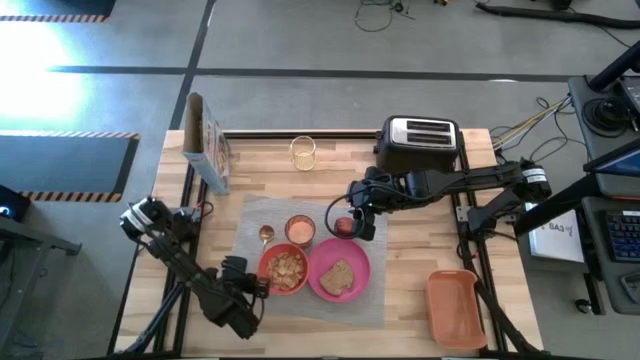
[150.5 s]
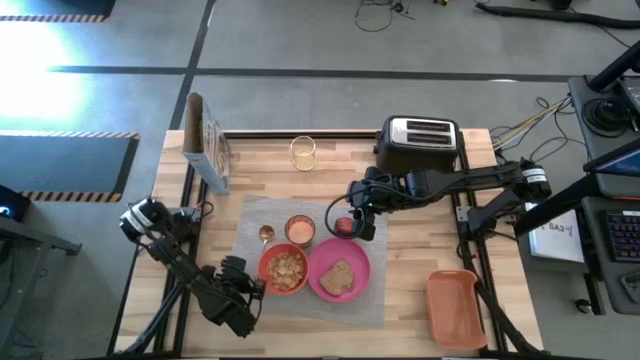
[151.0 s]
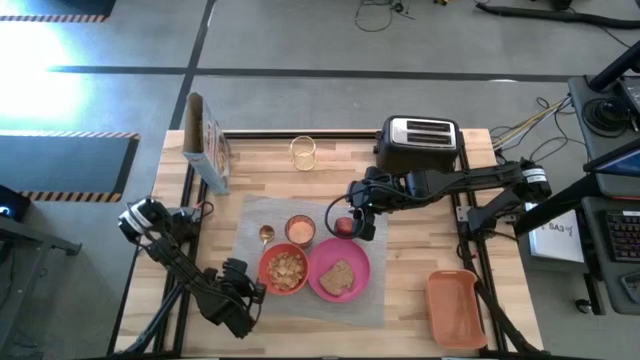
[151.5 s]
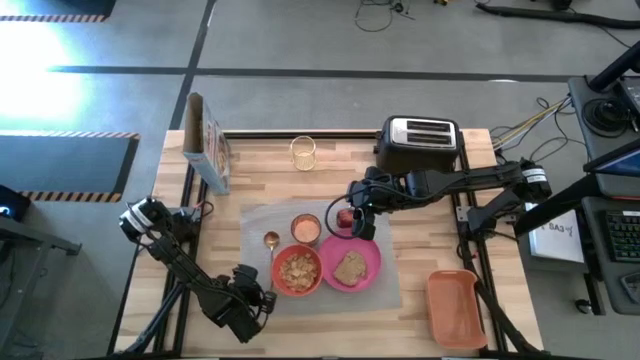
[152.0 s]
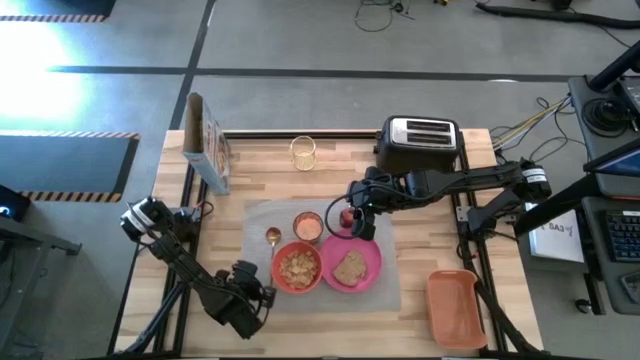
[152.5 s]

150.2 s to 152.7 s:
Task: Arrange a breakfast setting
Adjust the gray mat

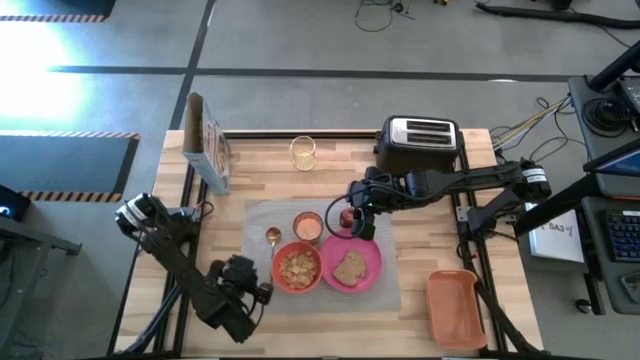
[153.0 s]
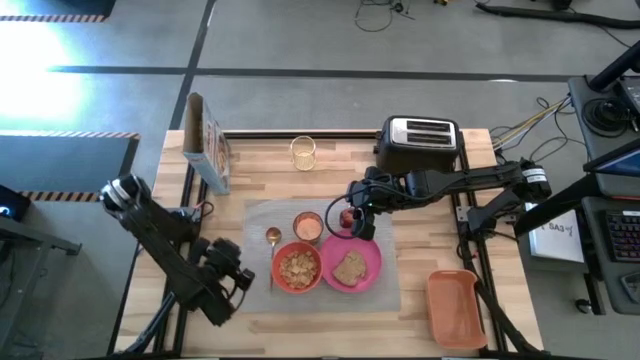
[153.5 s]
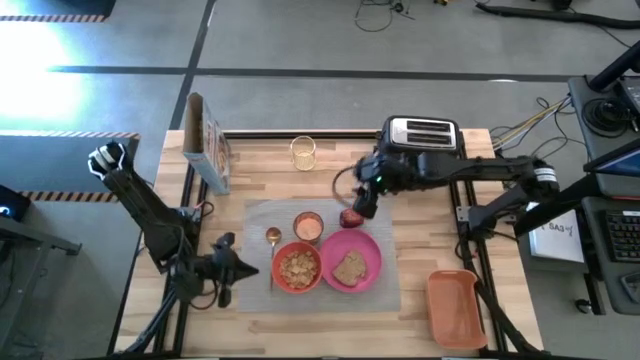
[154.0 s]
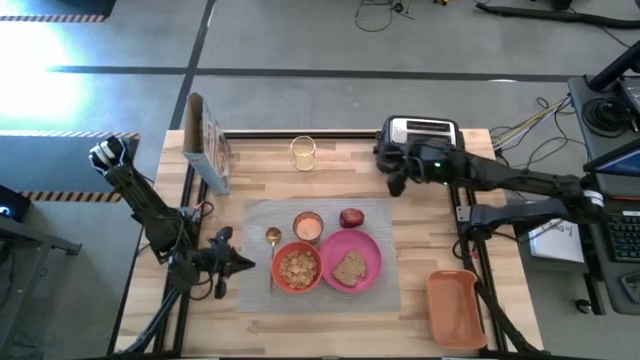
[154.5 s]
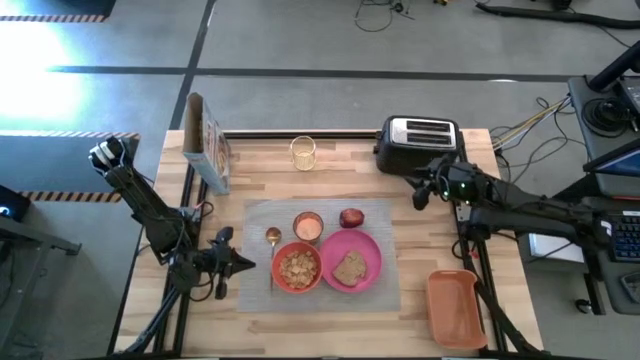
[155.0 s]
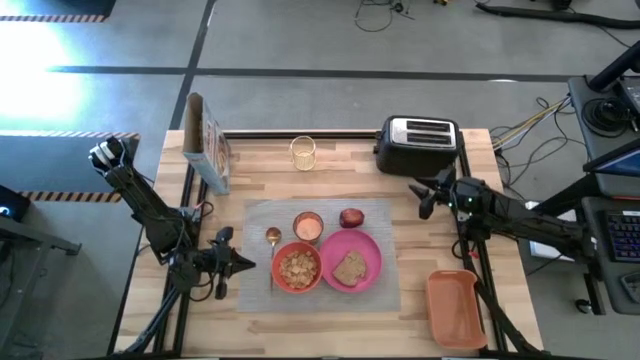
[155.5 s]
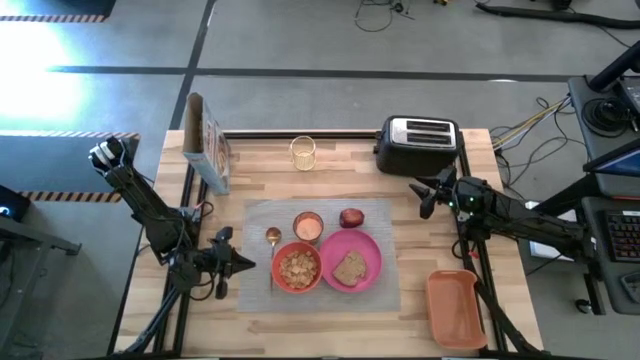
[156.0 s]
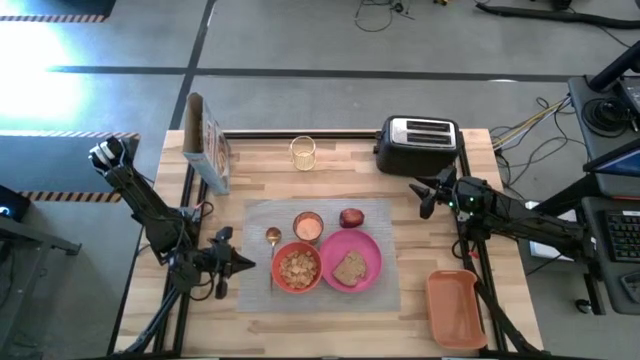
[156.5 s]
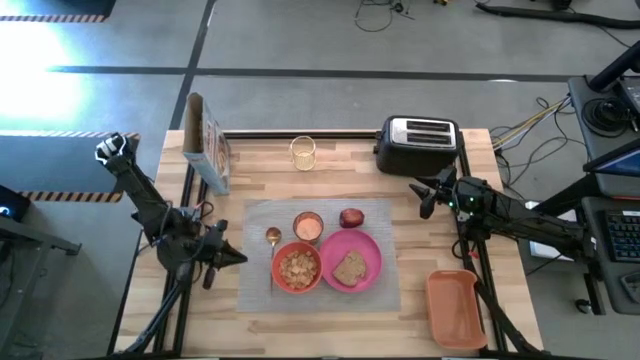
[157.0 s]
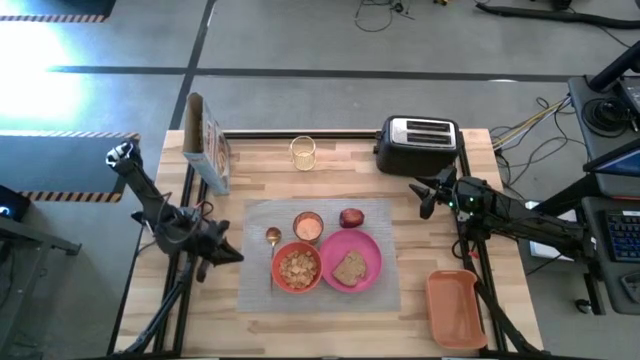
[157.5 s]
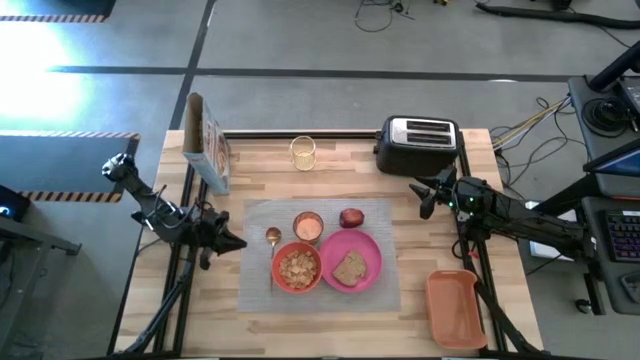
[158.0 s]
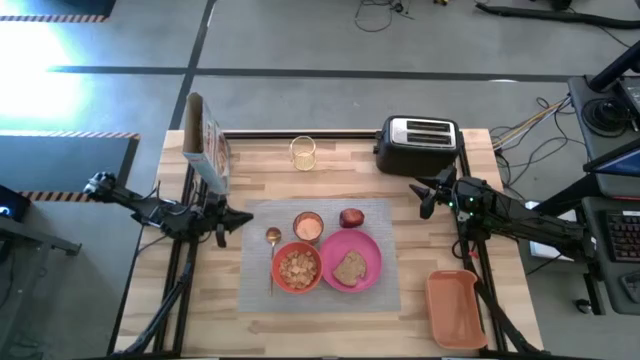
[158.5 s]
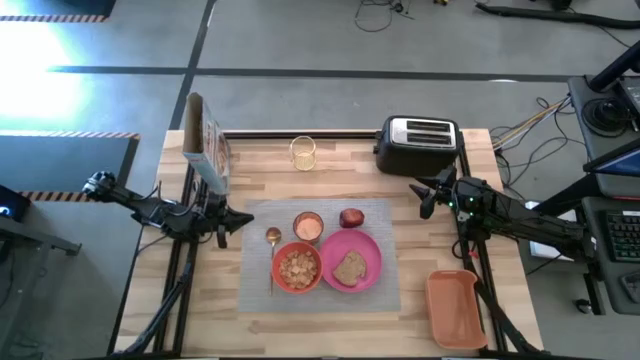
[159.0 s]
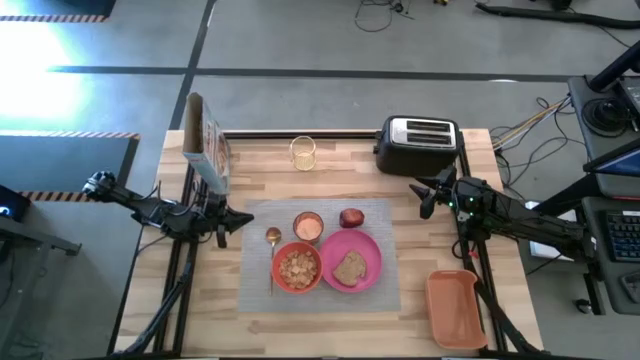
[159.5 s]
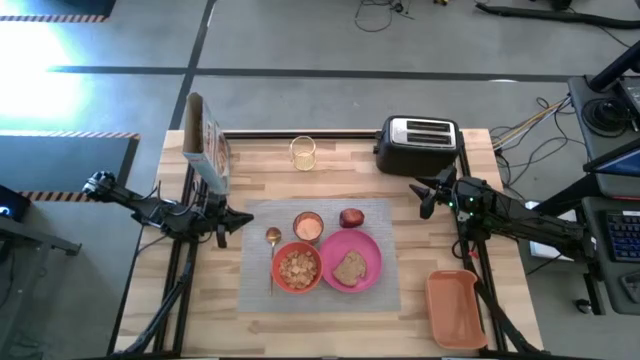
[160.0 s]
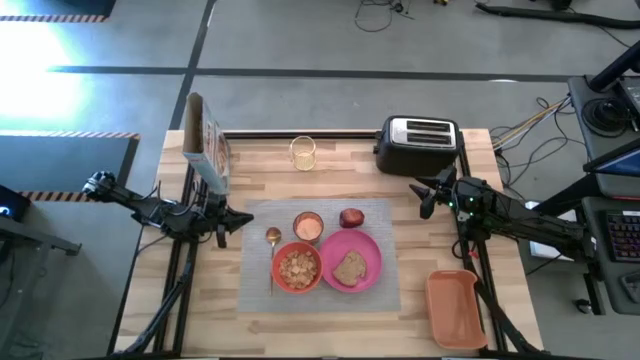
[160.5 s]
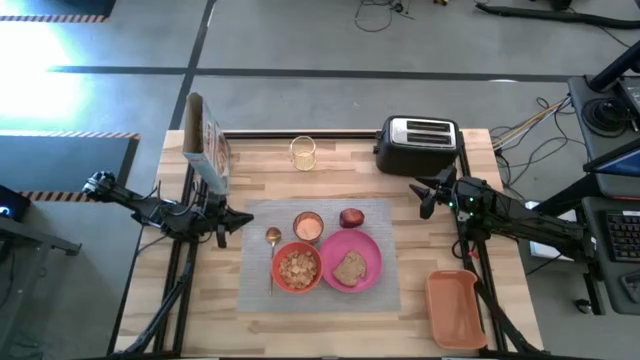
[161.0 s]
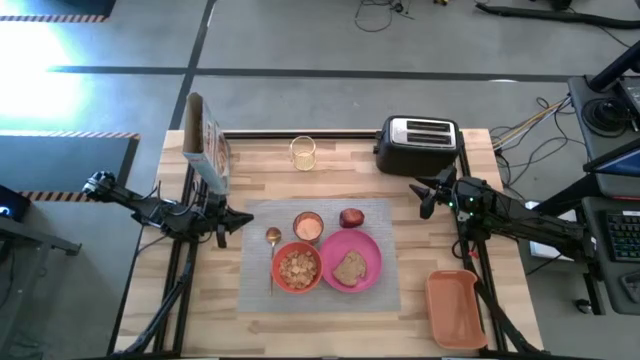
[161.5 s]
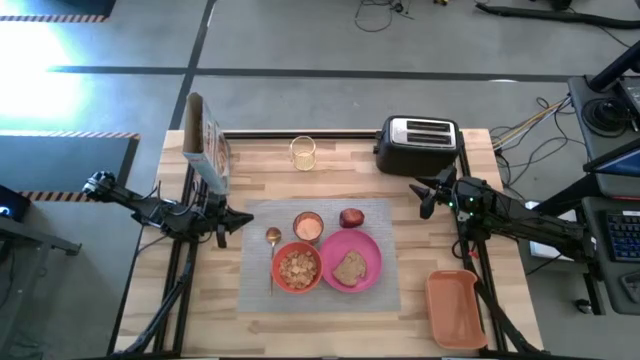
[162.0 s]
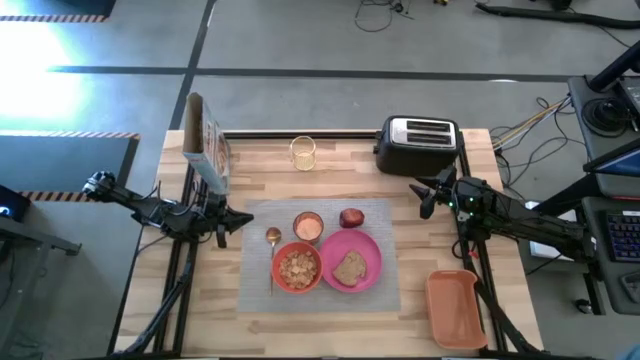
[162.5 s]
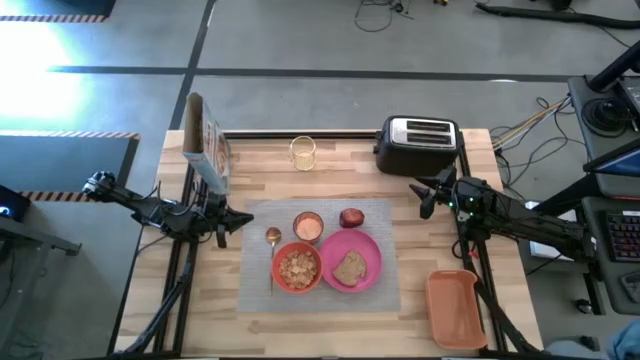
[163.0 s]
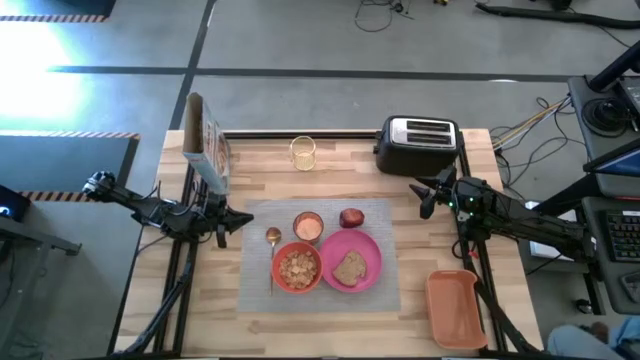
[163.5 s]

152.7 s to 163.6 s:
Return to Home Position

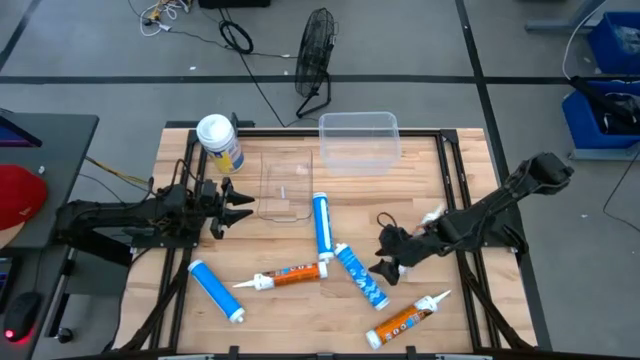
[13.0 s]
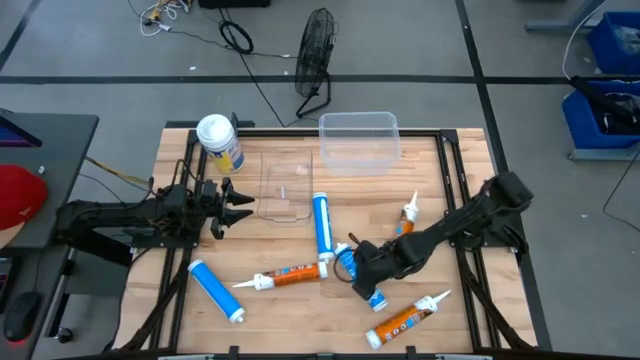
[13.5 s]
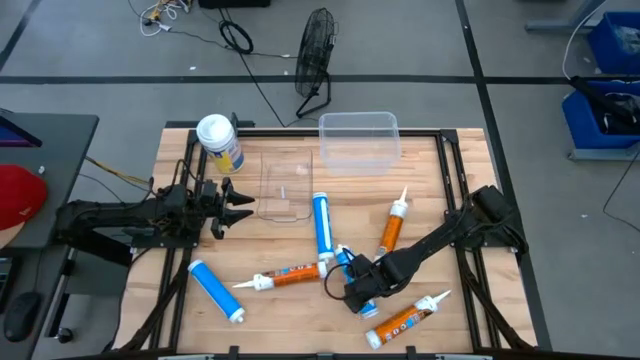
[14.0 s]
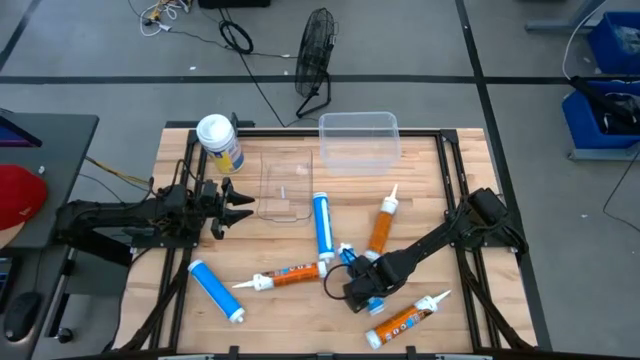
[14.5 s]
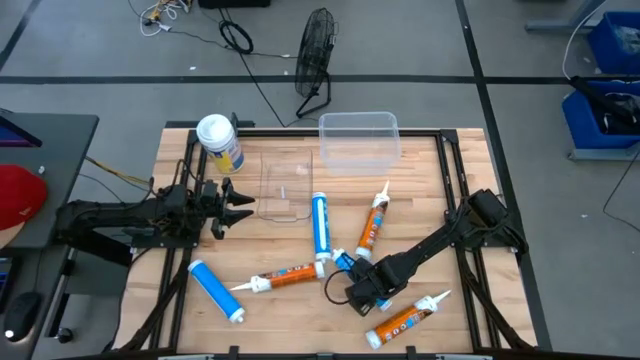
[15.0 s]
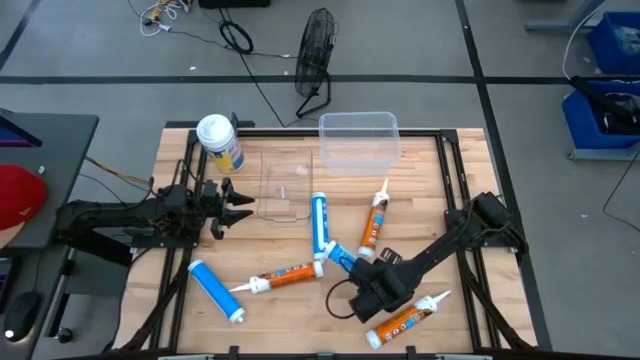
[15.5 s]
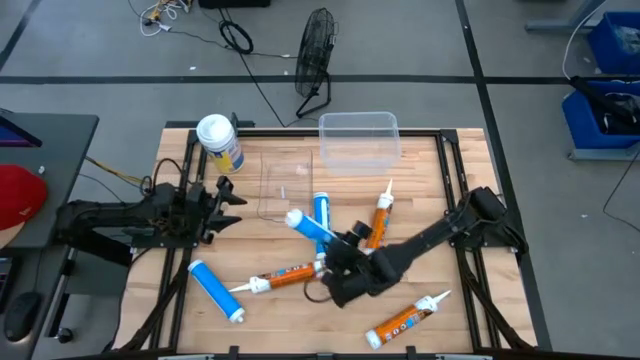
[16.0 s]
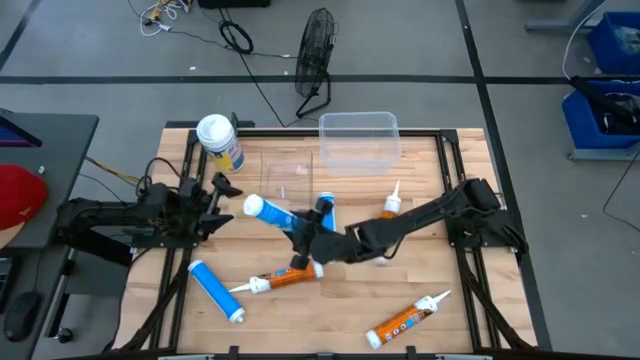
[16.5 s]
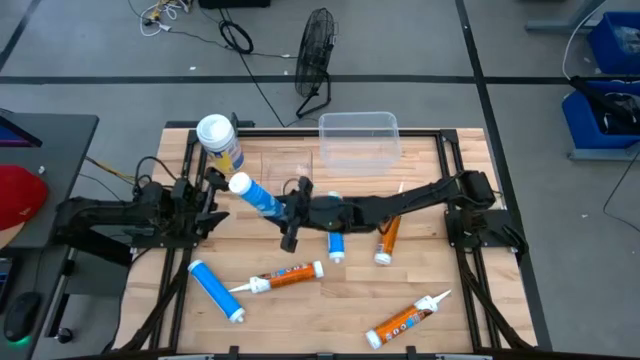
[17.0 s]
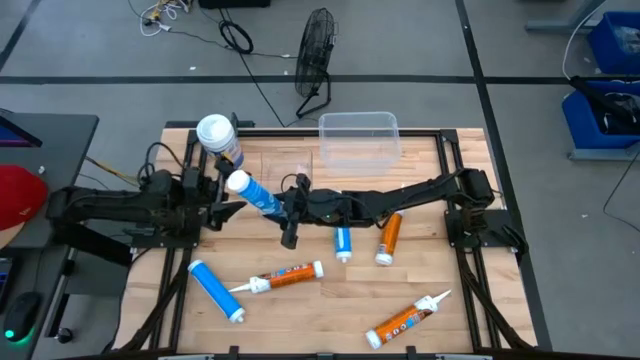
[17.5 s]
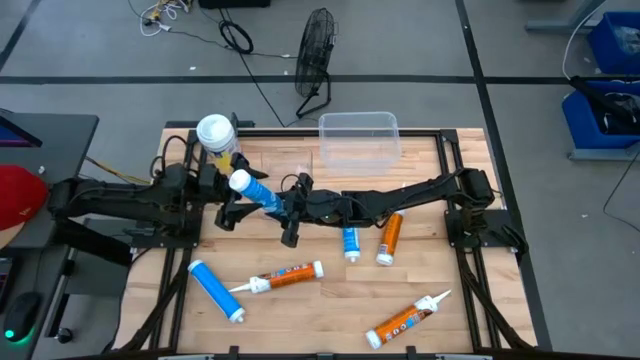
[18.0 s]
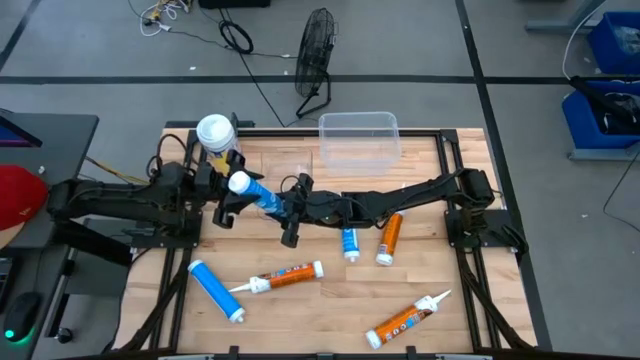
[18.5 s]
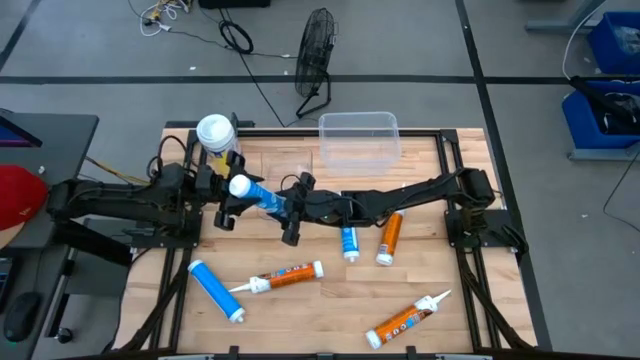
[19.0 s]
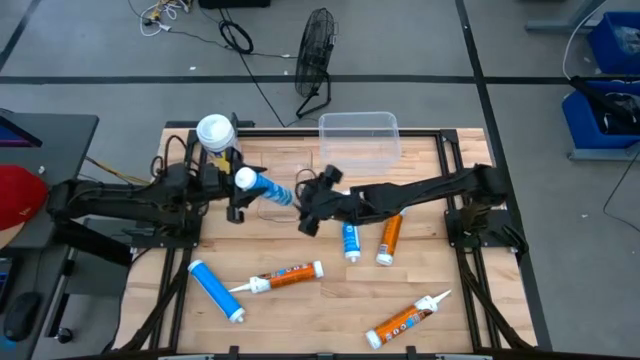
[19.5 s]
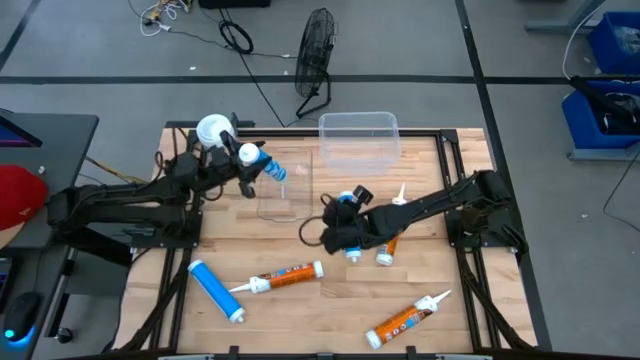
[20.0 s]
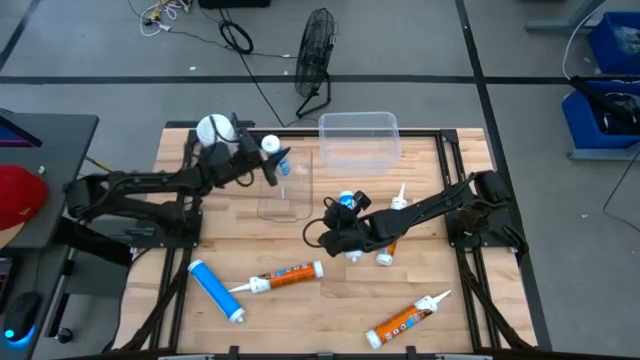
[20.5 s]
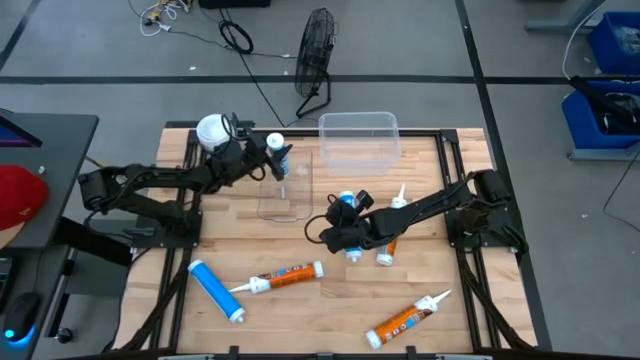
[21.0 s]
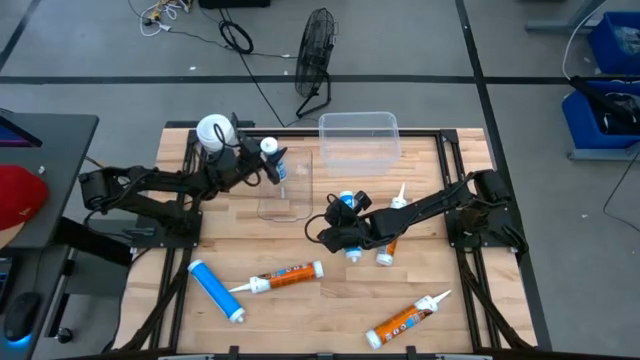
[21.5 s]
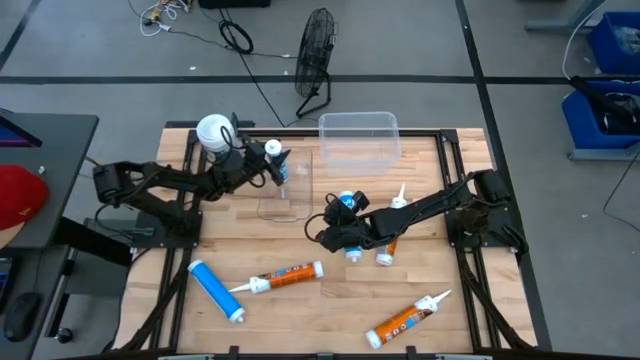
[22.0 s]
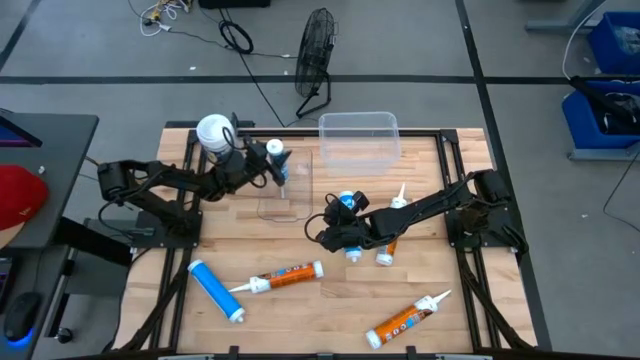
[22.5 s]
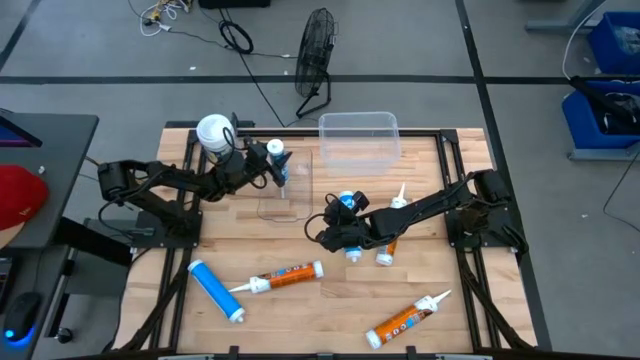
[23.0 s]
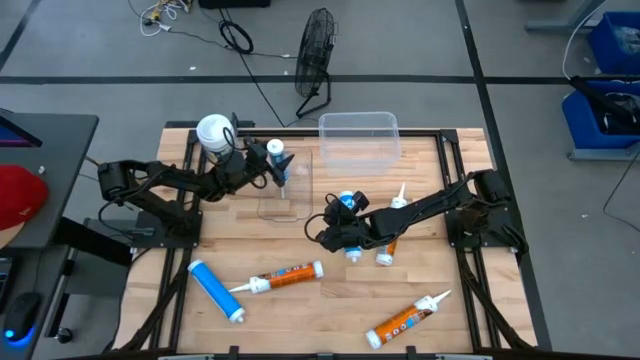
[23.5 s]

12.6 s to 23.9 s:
Task: Pick & place silicon tubes, Sealant and Lysol wipes
Put the bottom right blue sealant into the left transparent bin
